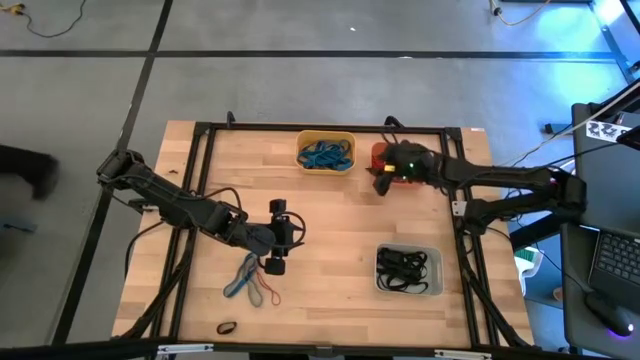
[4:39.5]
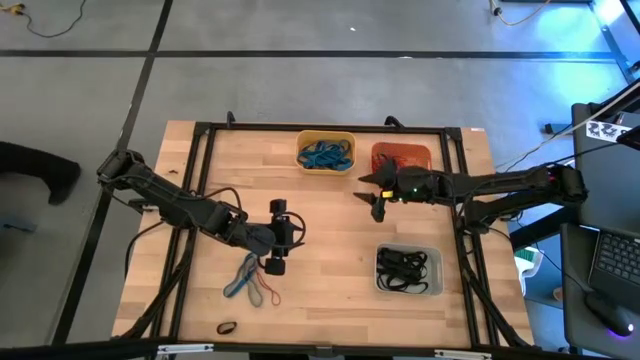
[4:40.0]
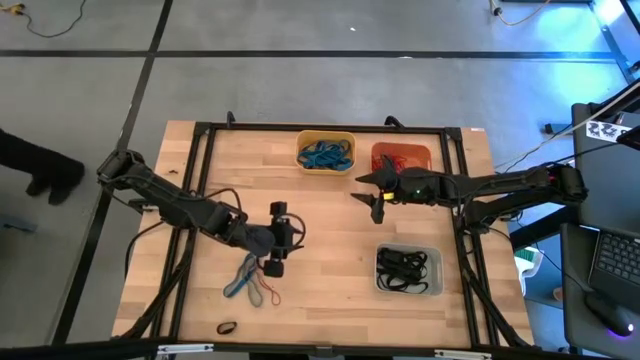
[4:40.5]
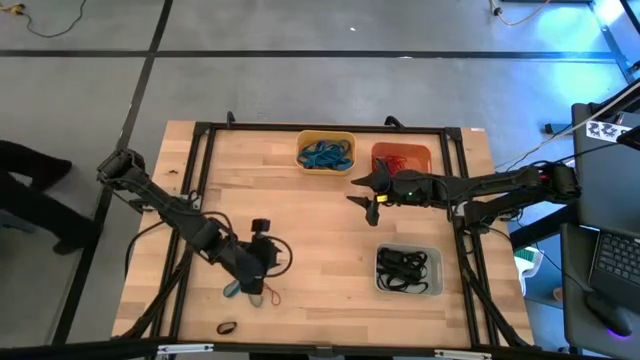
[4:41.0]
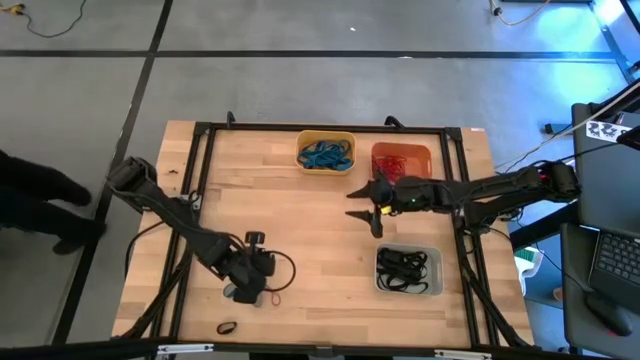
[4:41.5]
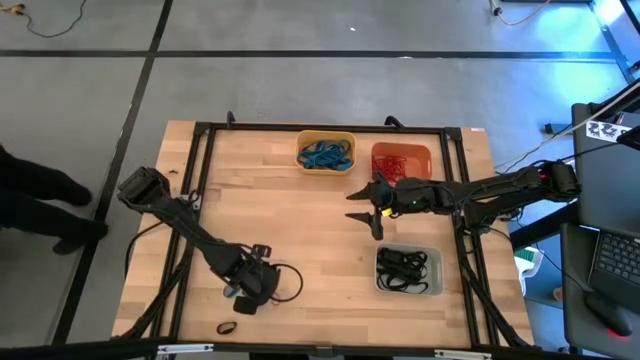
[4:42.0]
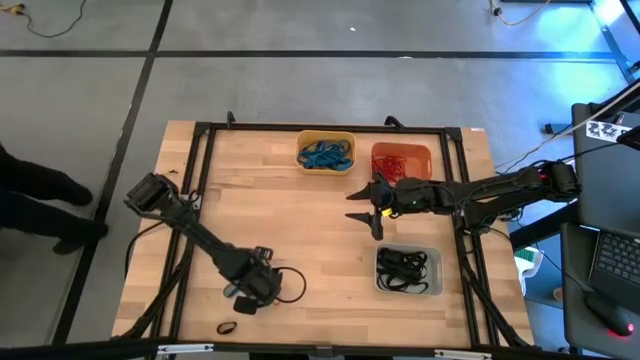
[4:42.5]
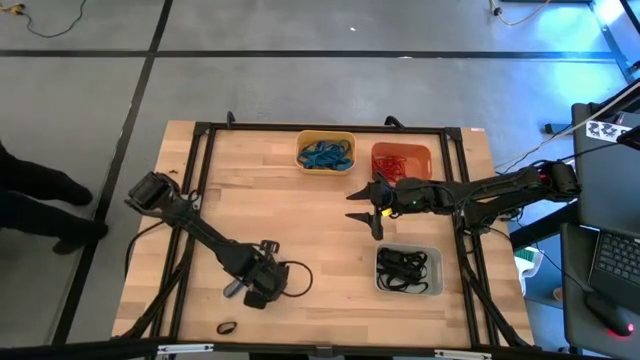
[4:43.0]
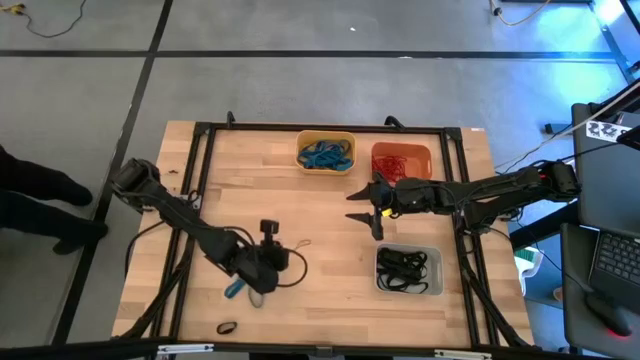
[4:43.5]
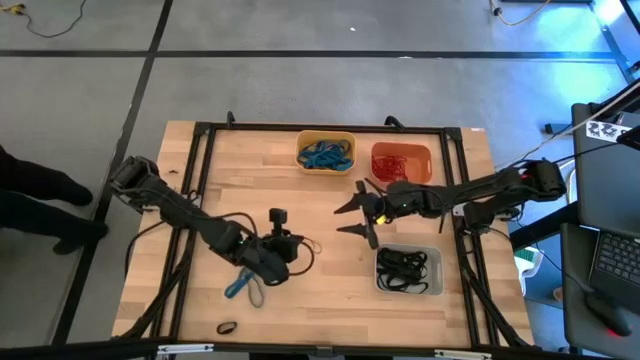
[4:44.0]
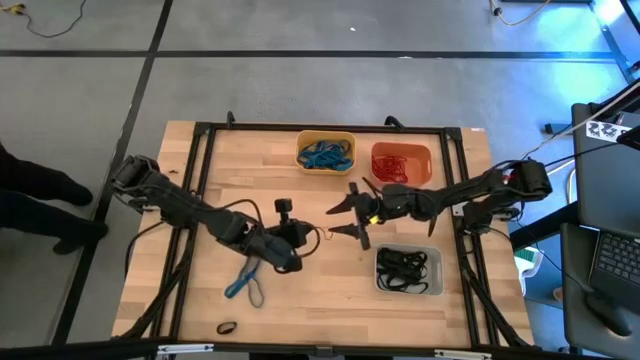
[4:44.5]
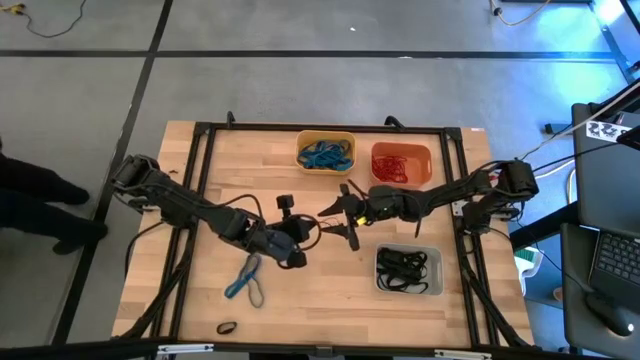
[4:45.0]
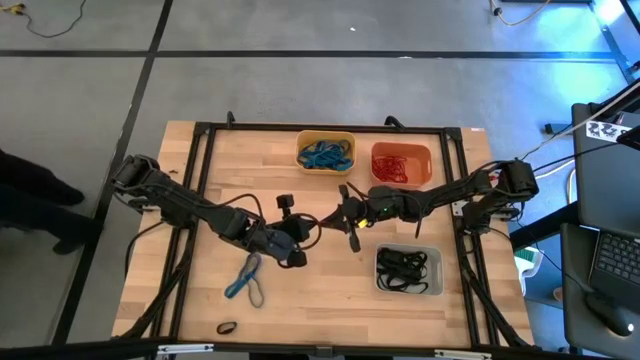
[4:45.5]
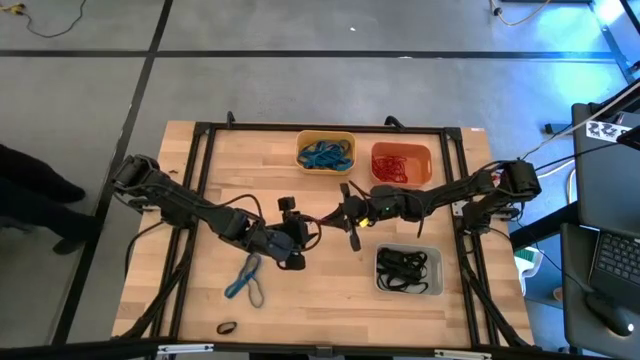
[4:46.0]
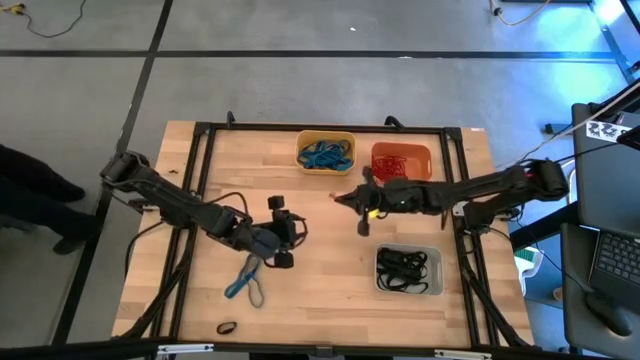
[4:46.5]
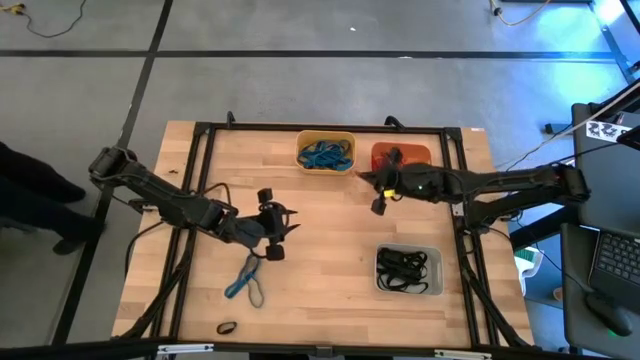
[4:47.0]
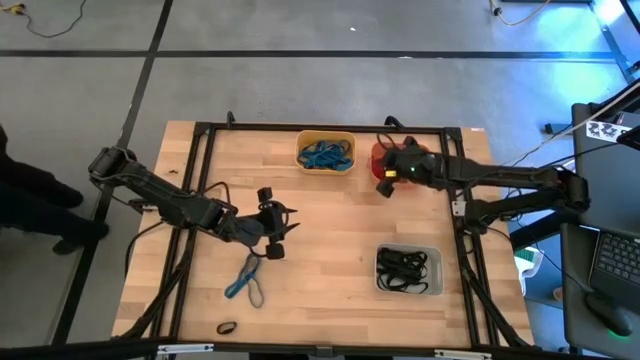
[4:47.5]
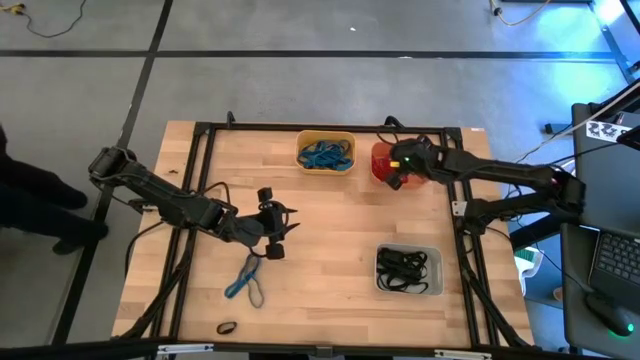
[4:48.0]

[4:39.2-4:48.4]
Task: Sort rubber bands into baskets
Put the red rubber band into the orange bin

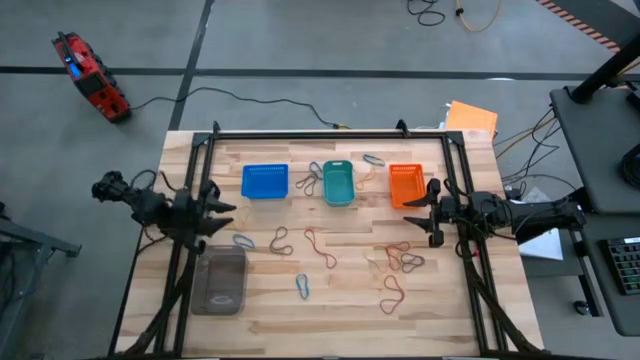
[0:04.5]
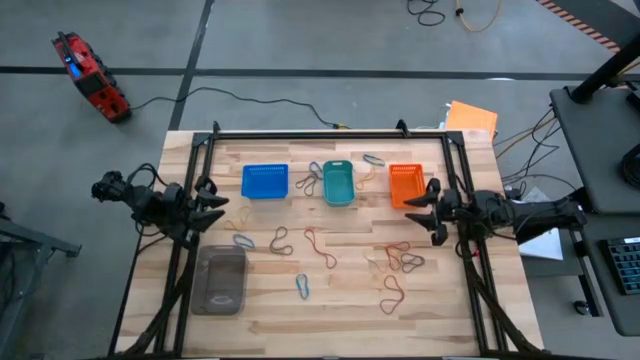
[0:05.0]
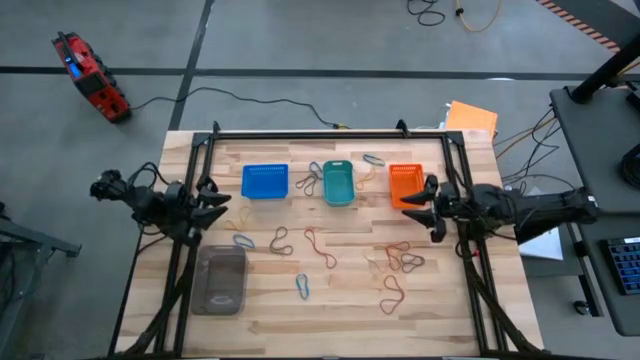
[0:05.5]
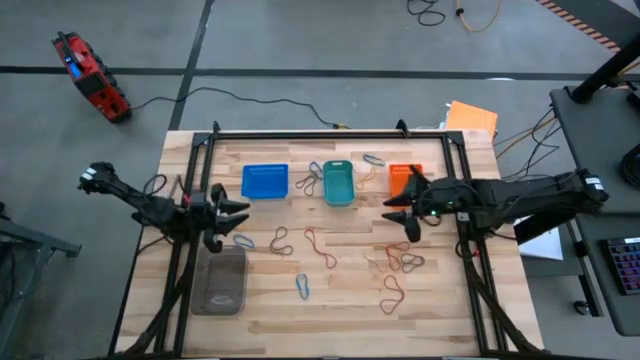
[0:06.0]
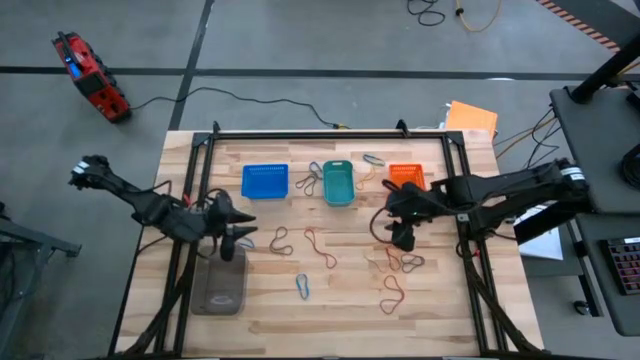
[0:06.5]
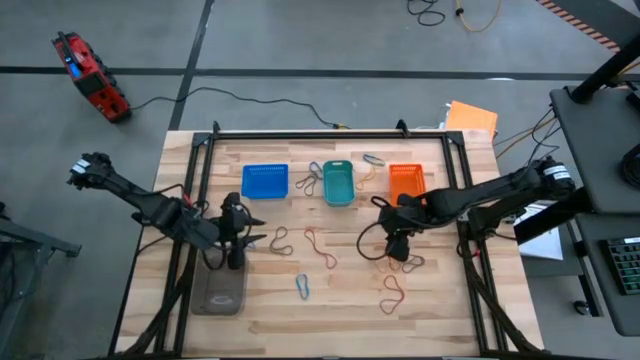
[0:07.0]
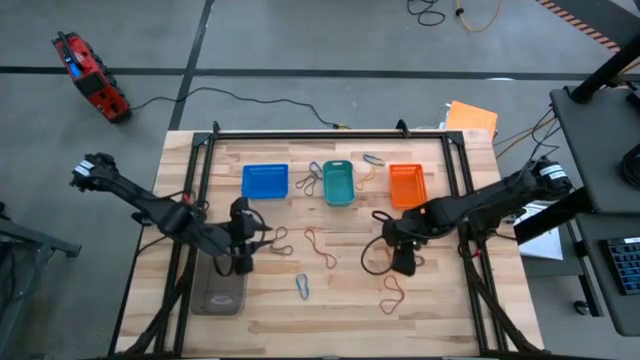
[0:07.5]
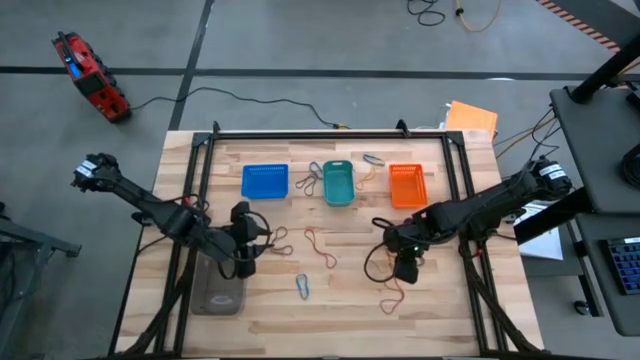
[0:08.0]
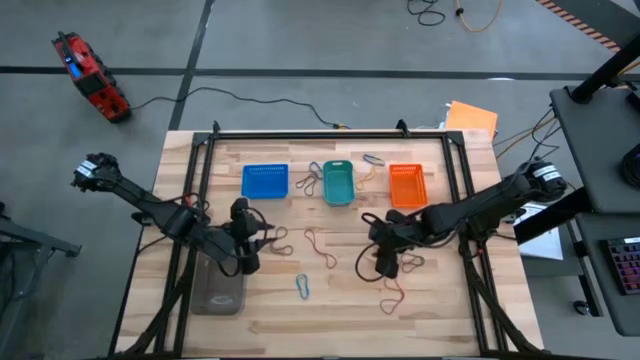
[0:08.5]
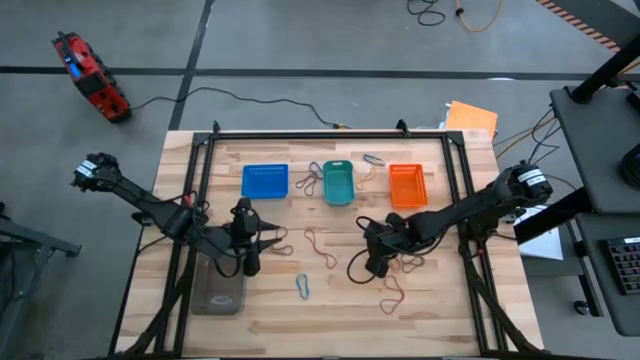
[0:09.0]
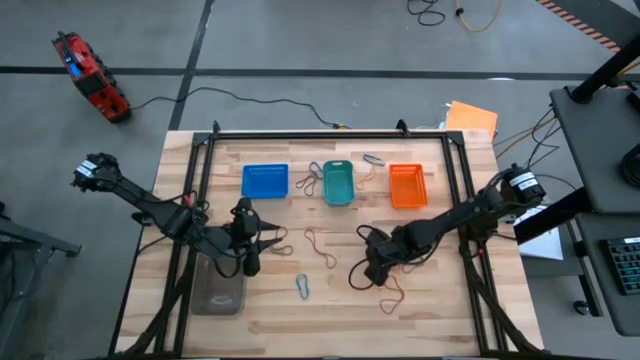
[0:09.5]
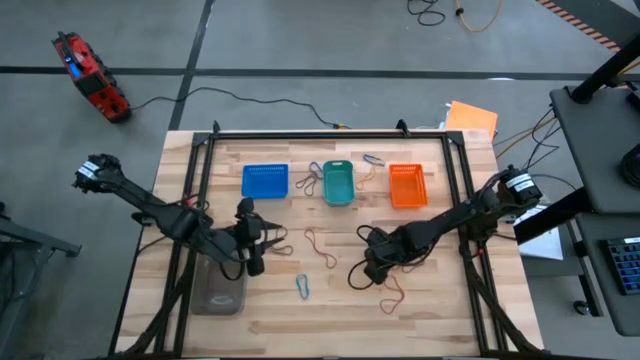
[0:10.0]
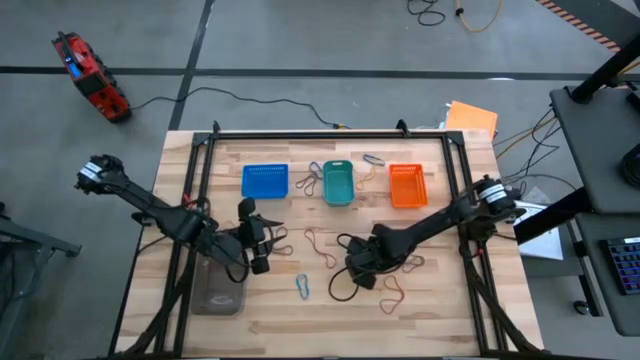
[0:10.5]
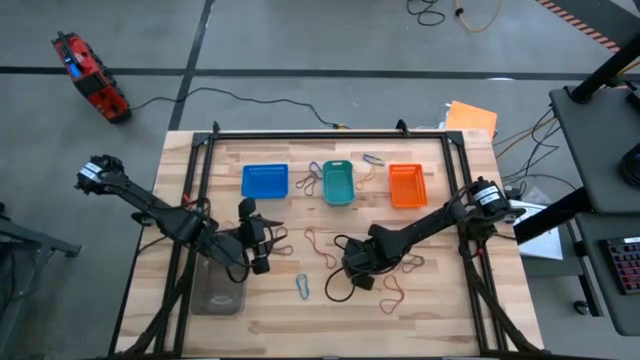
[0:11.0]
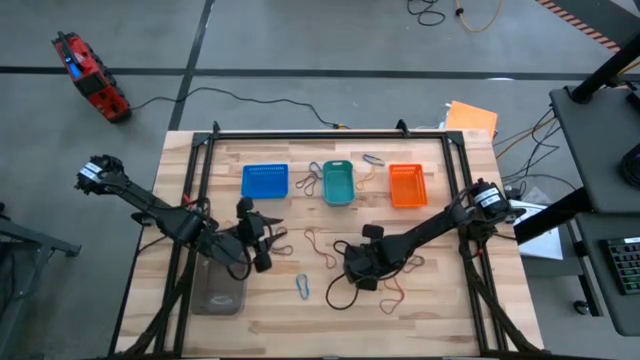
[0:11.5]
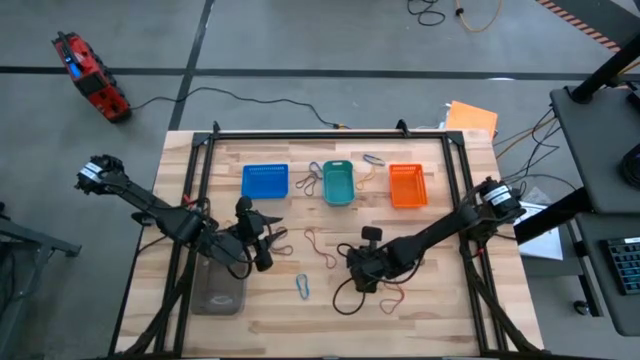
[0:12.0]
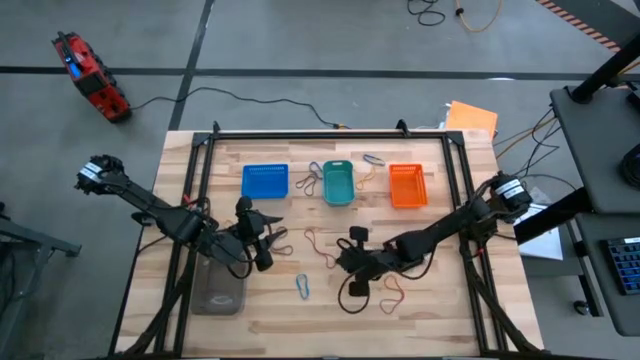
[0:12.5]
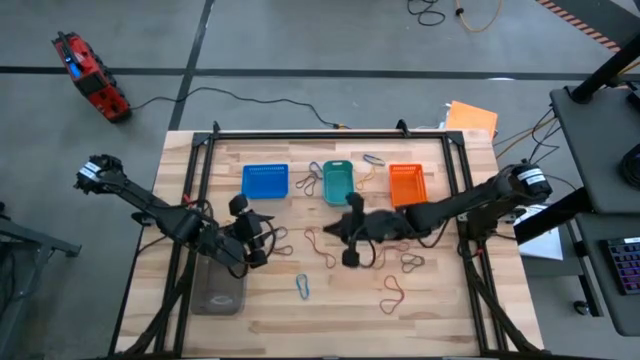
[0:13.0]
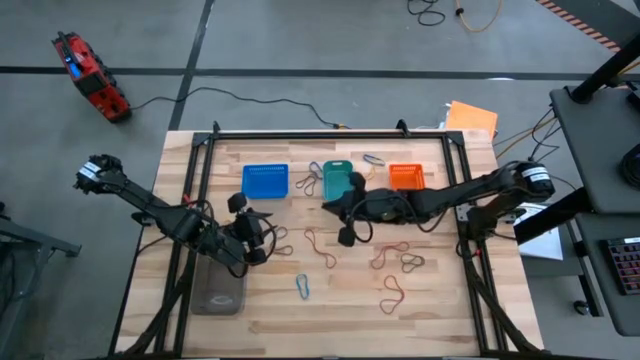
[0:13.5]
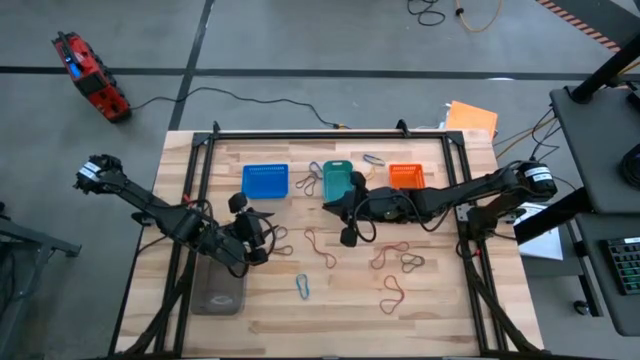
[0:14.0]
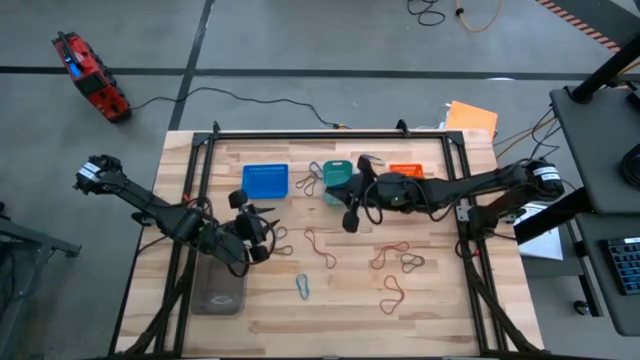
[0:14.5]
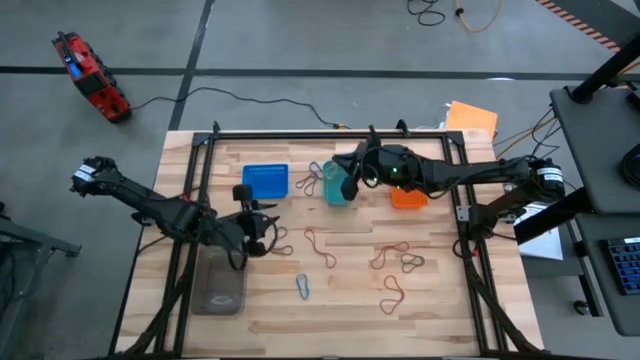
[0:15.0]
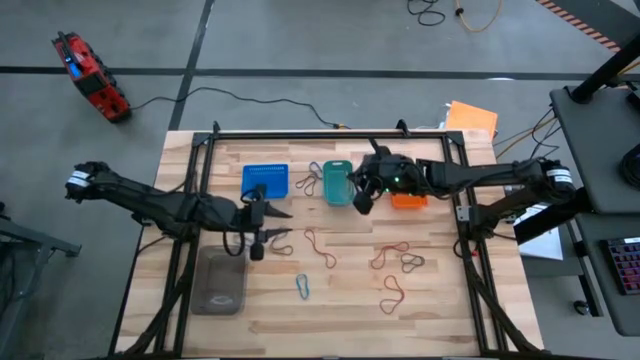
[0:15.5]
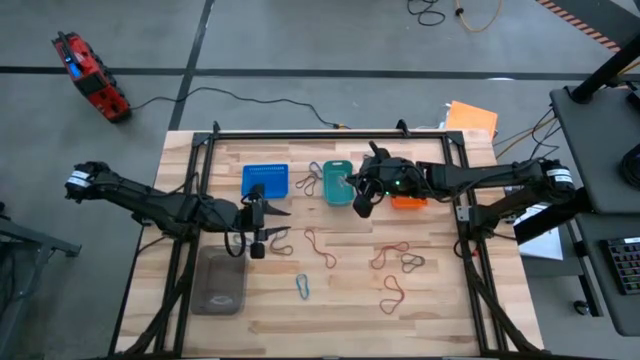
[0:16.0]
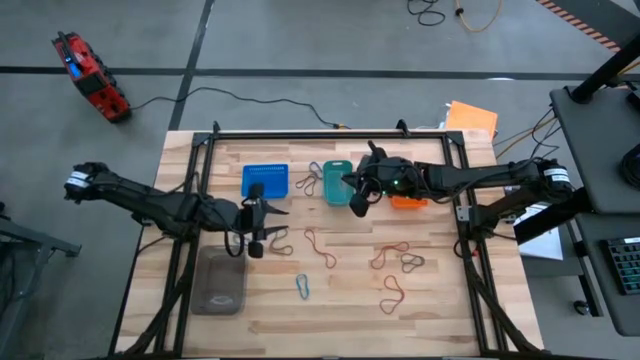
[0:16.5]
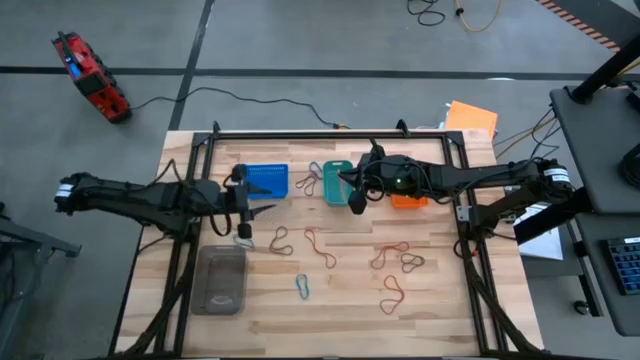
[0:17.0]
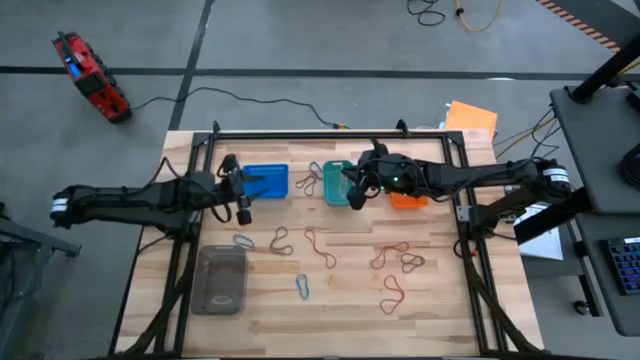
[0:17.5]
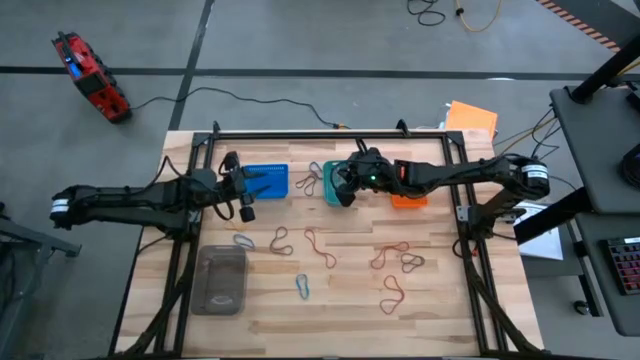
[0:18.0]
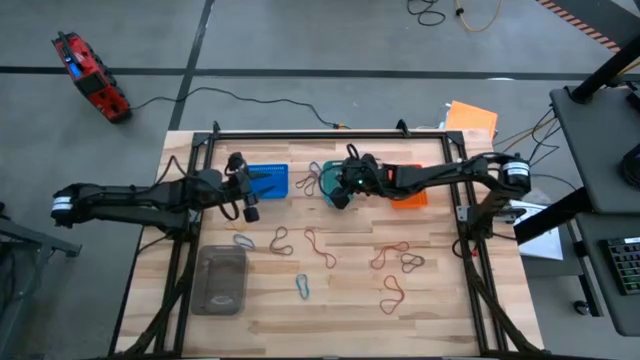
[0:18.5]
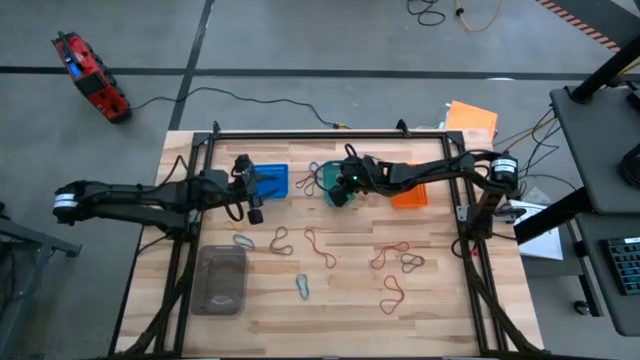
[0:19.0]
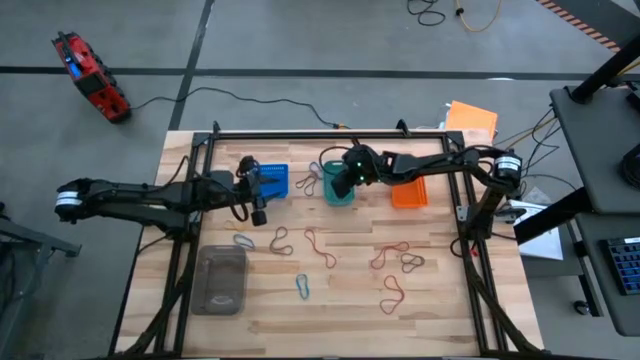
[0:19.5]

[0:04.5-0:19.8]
Task: Sort rubber bands into baskets
Put the bottom right yellow rubber band into the green bin
